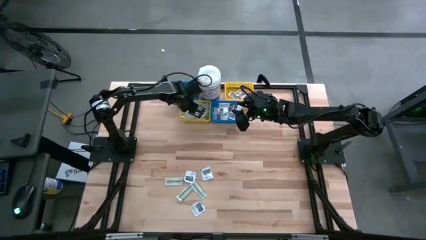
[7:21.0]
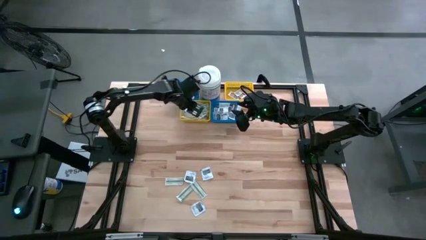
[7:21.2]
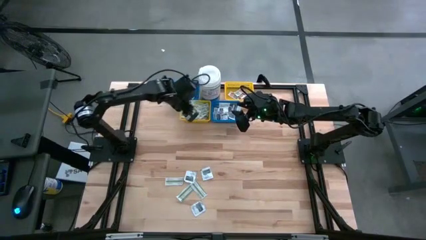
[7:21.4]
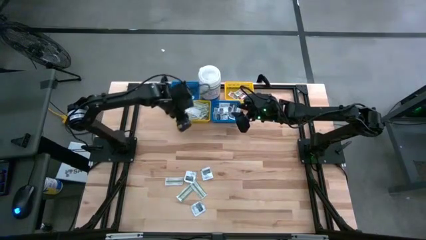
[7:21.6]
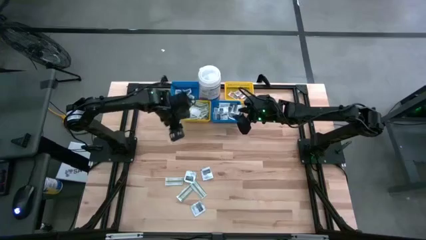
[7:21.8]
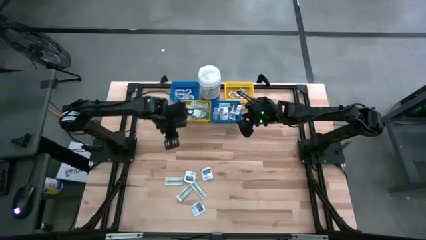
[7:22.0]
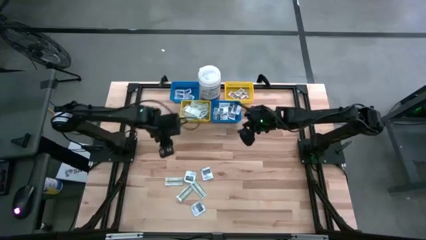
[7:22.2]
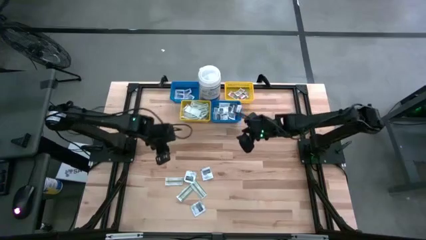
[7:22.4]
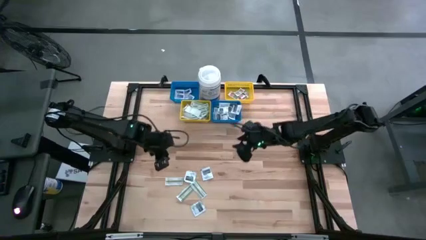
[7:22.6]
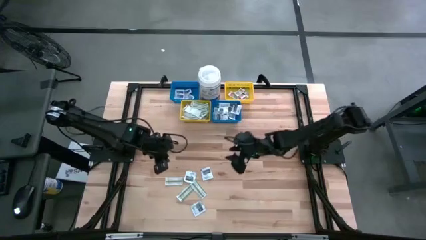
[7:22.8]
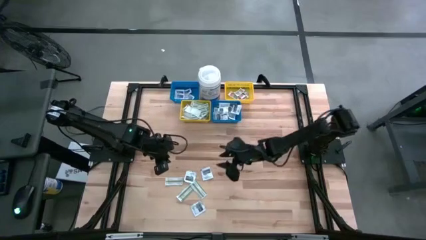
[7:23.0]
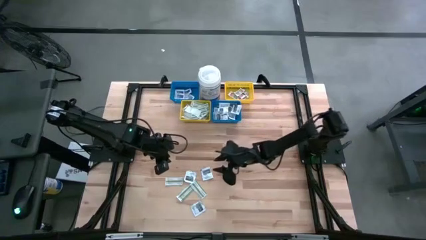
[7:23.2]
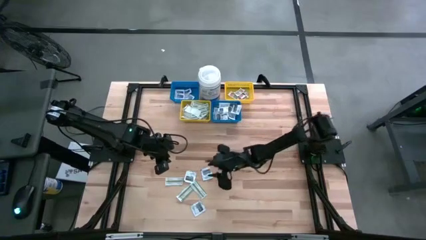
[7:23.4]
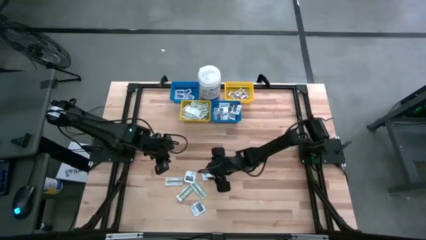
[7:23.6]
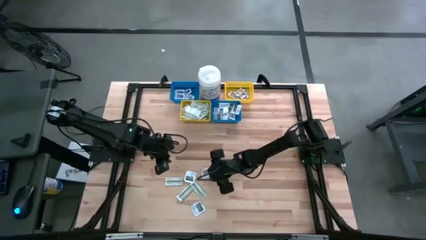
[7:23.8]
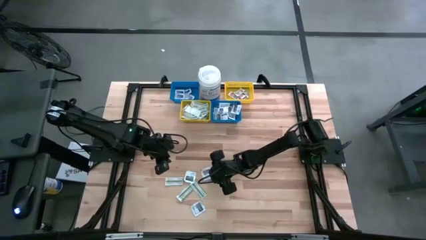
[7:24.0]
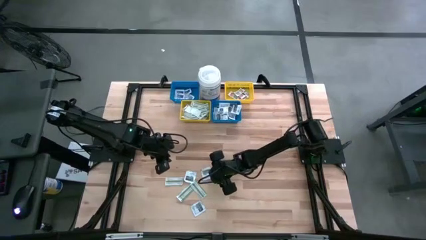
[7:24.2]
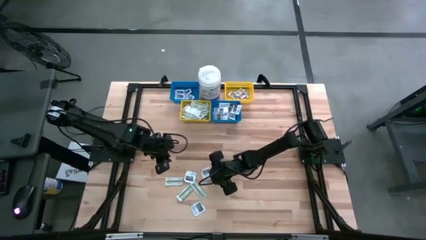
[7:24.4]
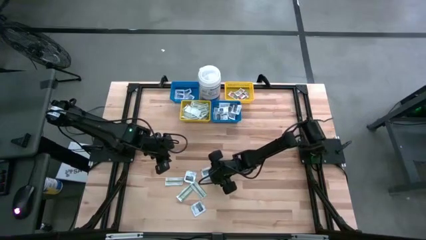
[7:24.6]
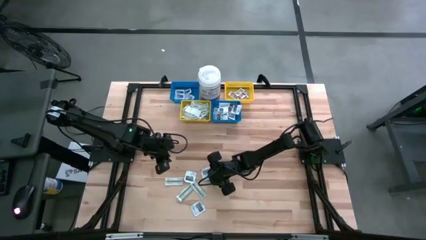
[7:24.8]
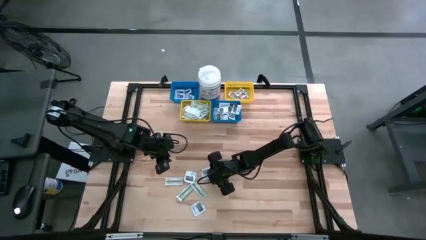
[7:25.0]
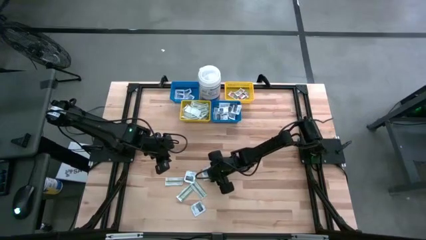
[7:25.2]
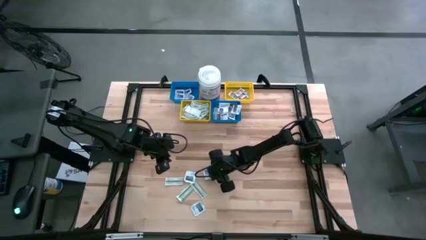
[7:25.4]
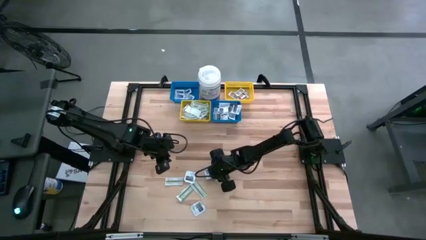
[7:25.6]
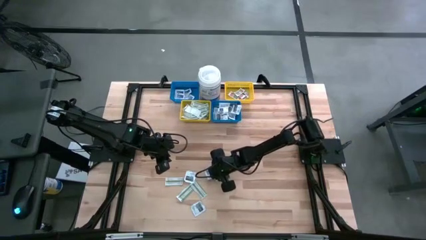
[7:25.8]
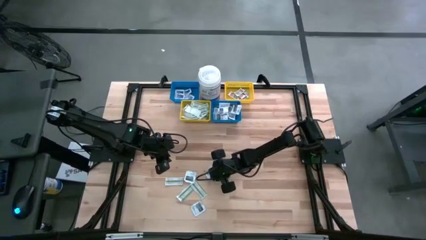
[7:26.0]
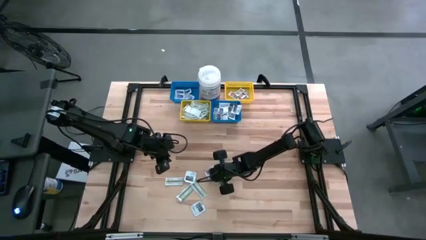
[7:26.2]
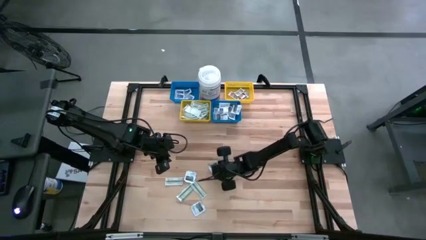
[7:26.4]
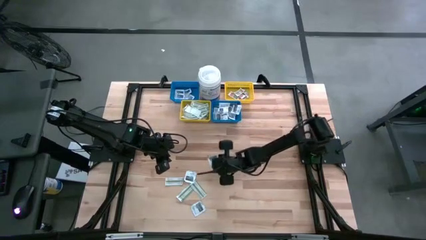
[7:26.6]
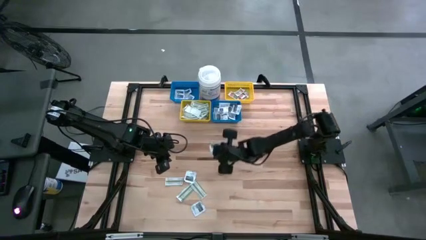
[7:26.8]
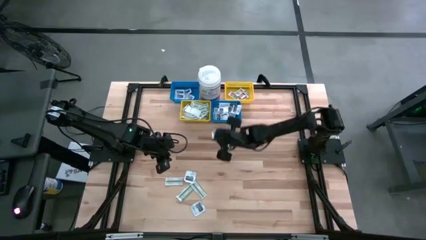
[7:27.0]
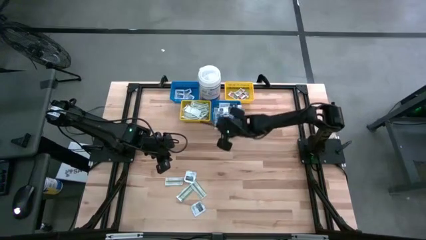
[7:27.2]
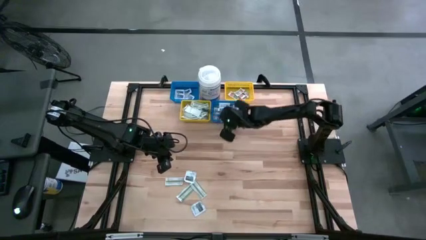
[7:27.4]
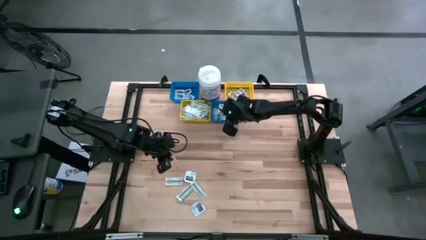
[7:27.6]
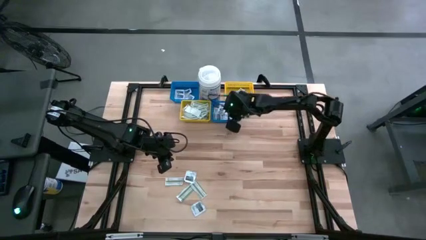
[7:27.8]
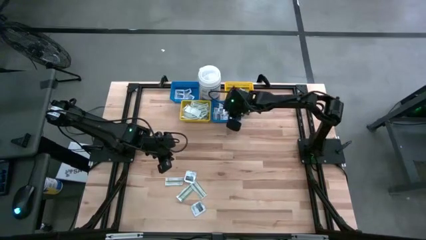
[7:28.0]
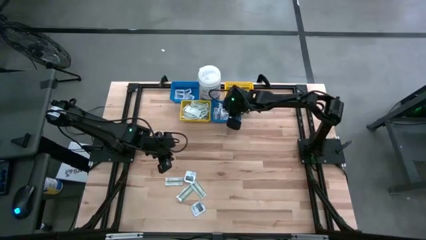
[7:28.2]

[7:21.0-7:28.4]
Task: Pick & Place First Aid Supplies
Put the black towelette pack into the right blue bin

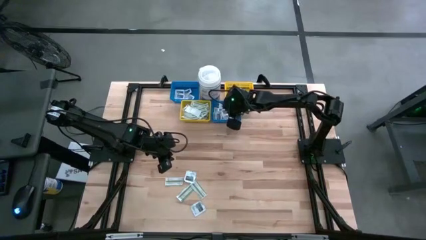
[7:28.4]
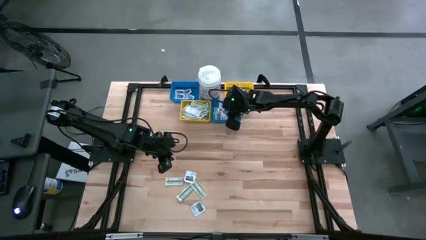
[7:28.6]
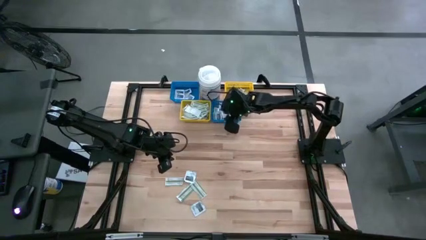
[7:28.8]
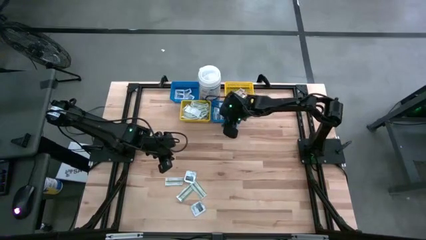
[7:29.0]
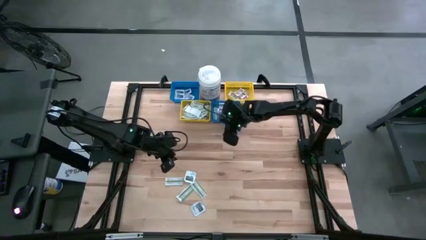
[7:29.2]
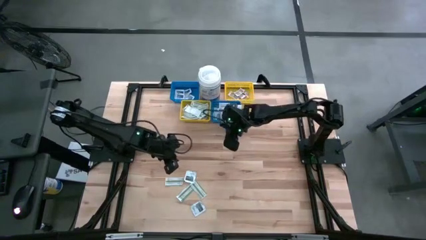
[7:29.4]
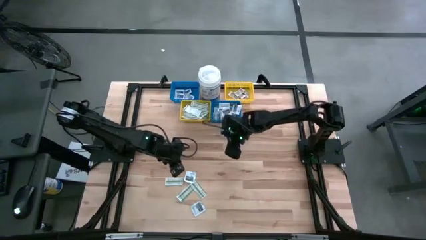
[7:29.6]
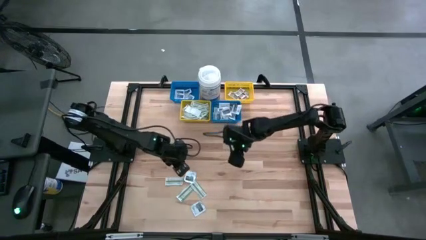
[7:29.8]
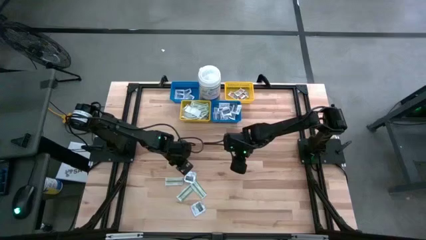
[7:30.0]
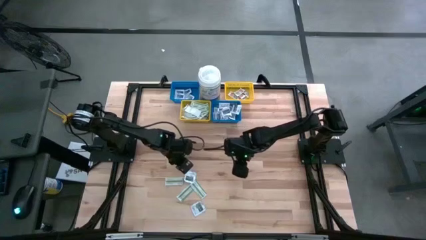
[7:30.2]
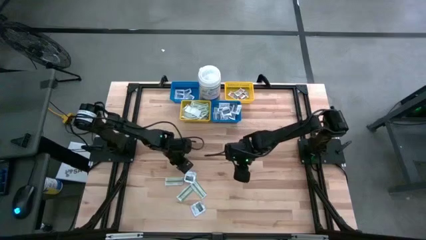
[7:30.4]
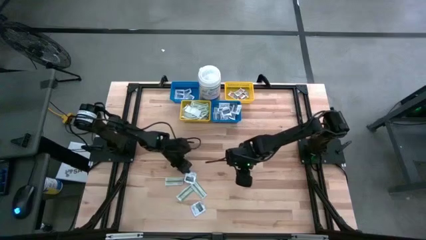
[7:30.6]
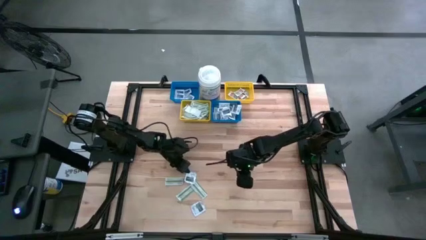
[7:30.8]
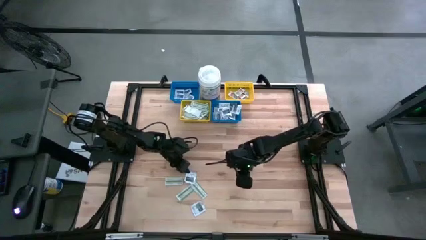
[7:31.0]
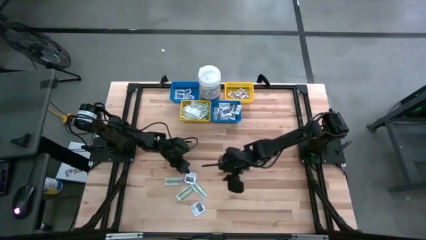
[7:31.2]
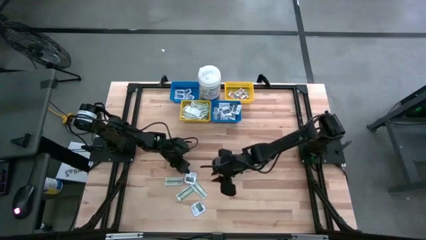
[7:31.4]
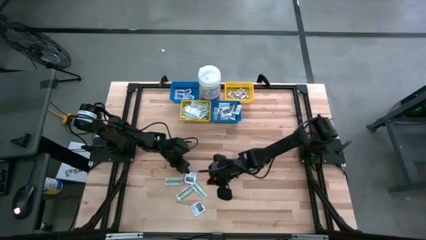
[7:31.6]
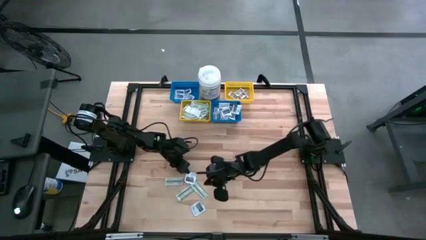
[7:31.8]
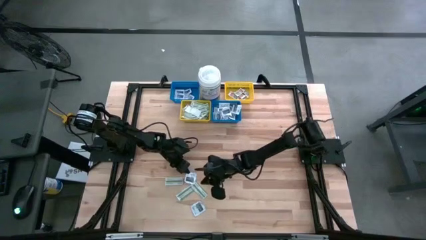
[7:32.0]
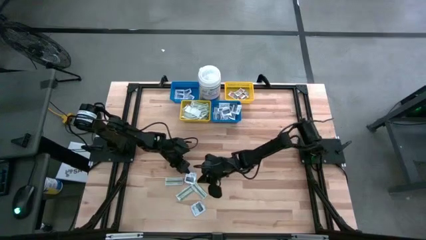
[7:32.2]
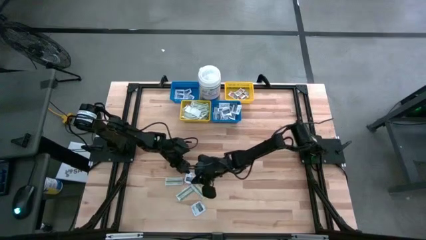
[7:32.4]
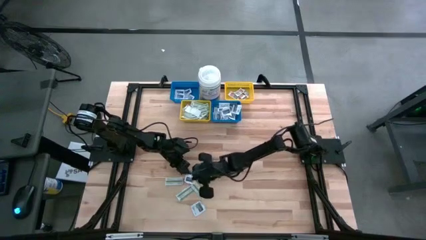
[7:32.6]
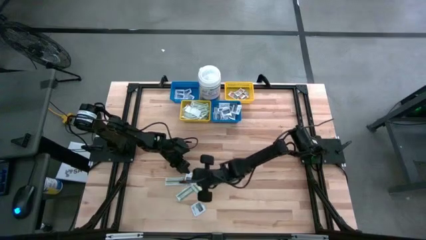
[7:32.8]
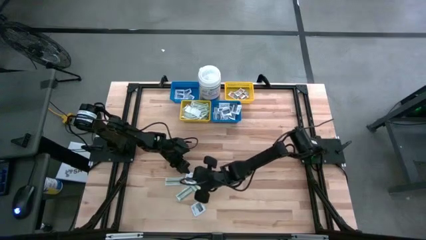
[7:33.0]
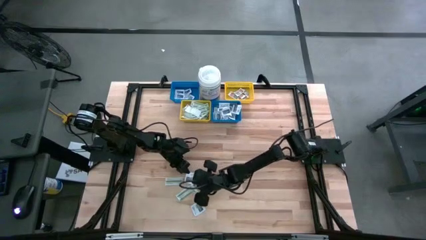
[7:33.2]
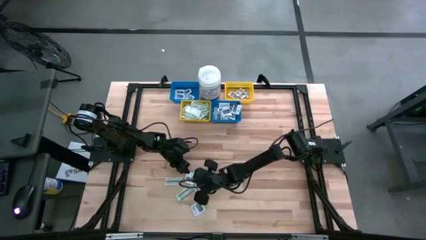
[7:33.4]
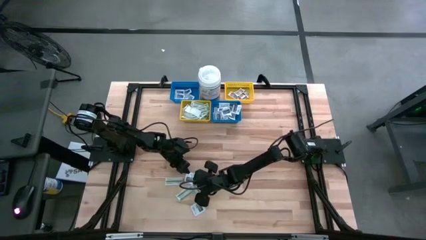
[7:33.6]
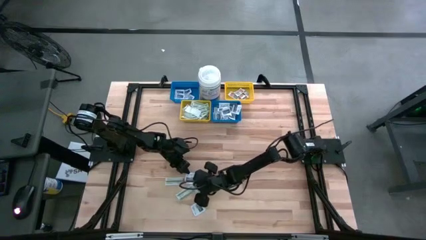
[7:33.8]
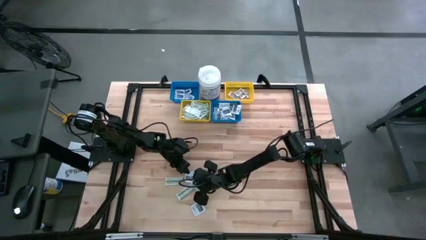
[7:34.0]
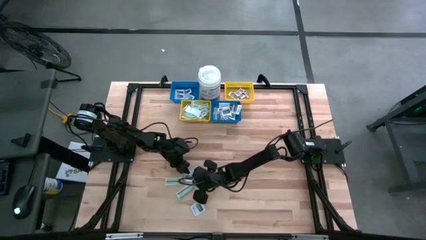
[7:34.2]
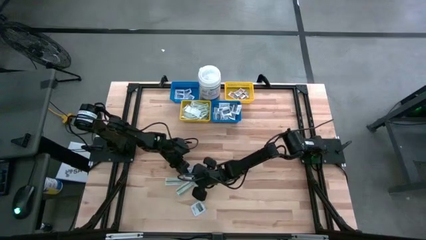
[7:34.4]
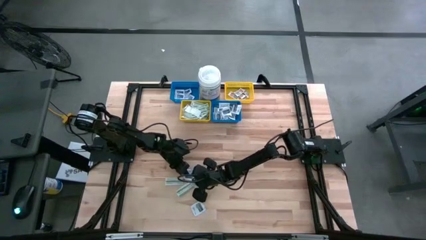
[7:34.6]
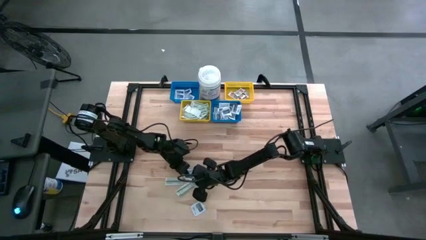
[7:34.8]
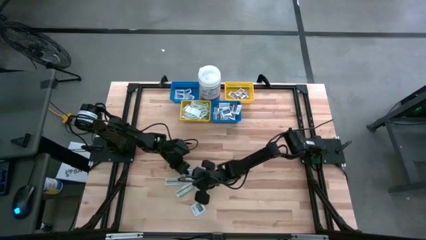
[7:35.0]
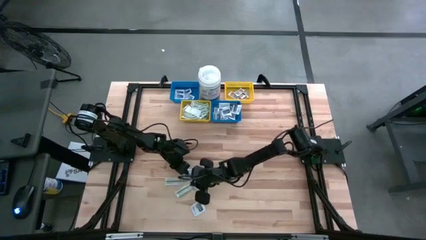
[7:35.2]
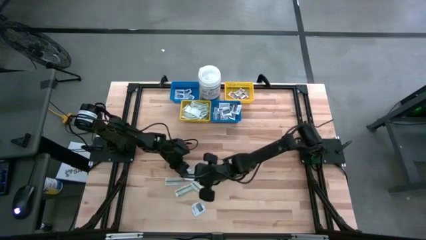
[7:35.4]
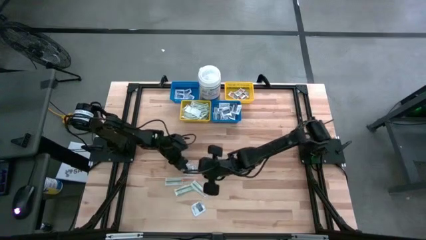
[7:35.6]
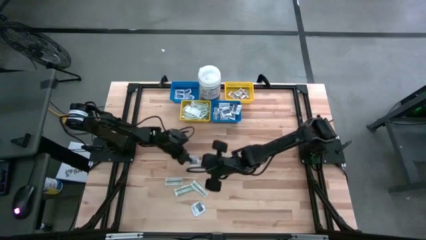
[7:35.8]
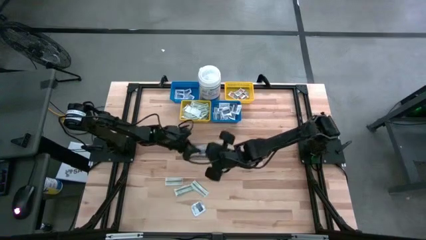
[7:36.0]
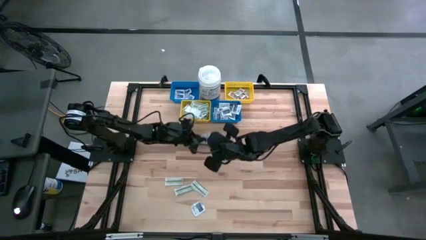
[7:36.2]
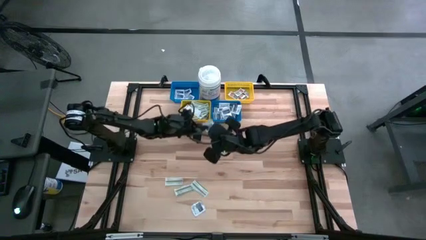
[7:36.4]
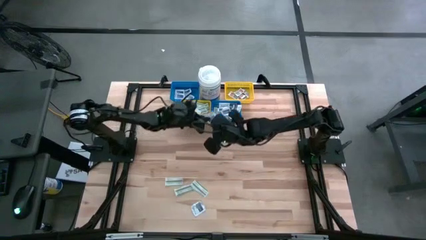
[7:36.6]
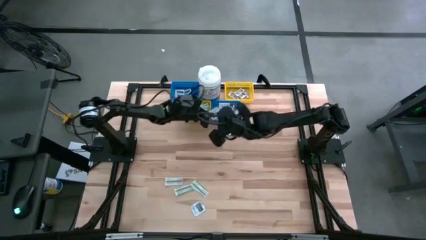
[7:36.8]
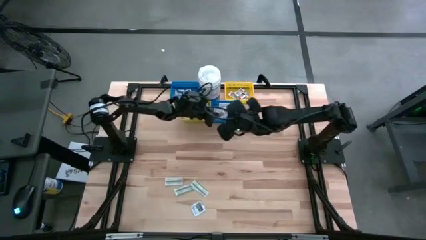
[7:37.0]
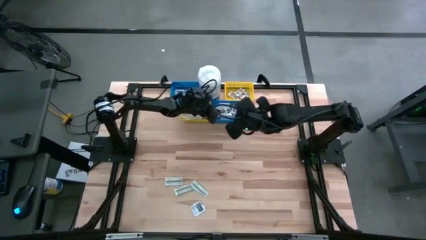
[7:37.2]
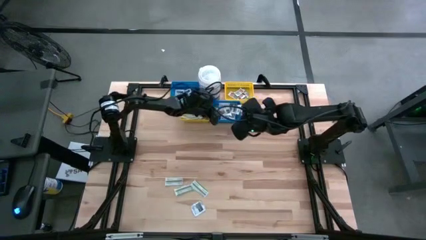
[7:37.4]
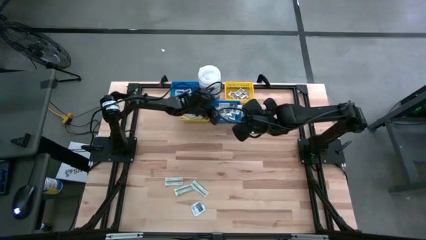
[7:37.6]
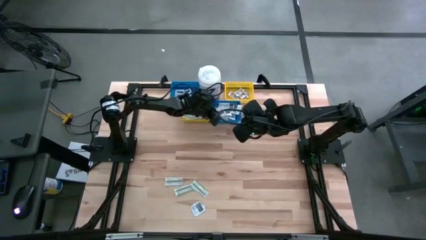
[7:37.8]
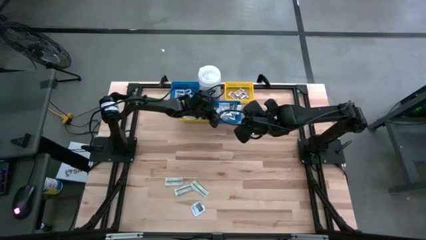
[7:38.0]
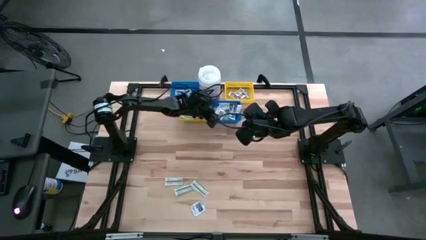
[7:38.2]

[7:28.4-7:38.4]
Put the black towelette pack into the right blue bin
